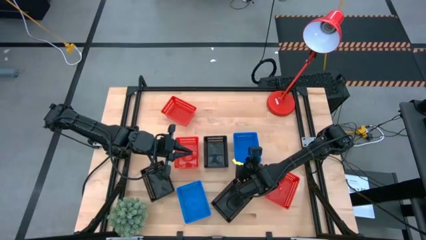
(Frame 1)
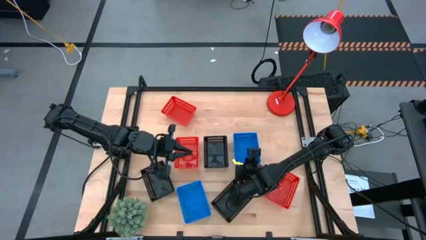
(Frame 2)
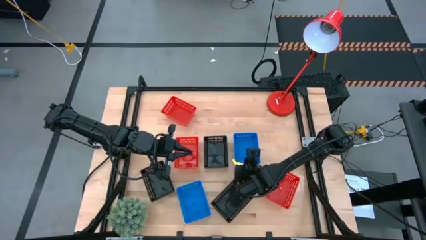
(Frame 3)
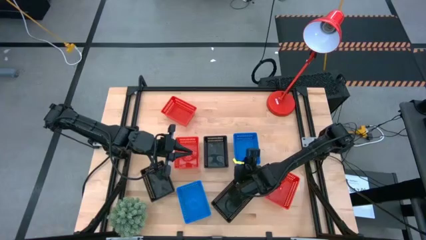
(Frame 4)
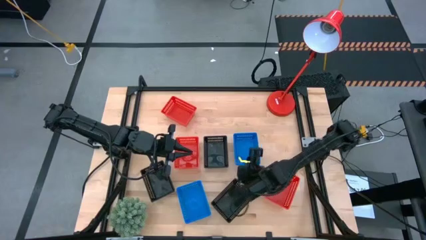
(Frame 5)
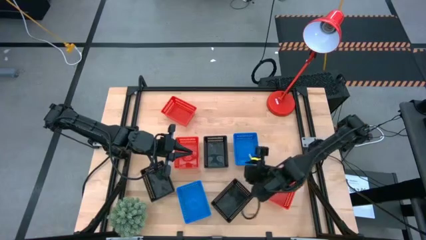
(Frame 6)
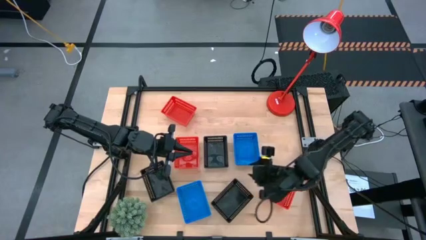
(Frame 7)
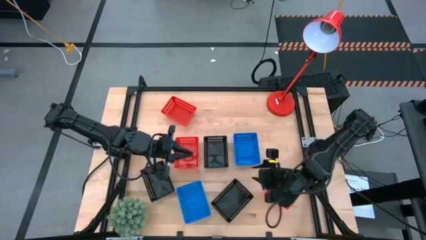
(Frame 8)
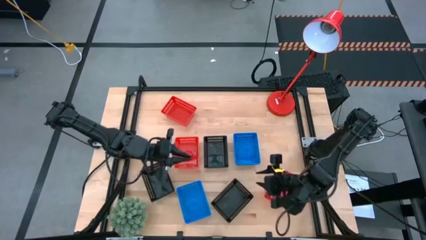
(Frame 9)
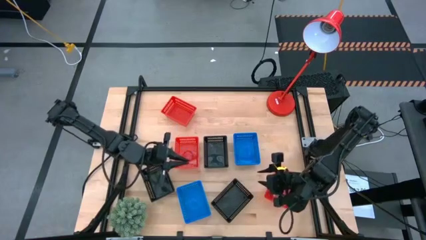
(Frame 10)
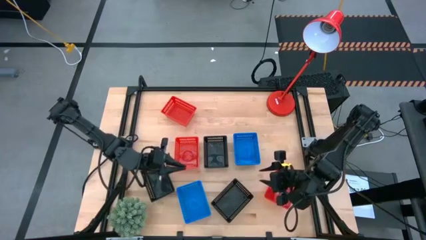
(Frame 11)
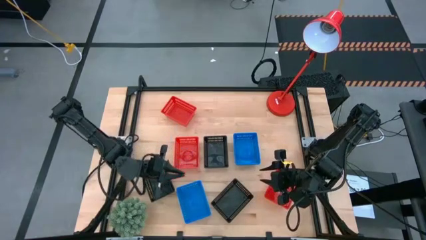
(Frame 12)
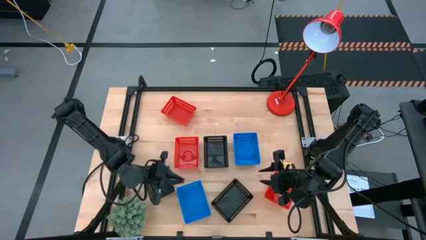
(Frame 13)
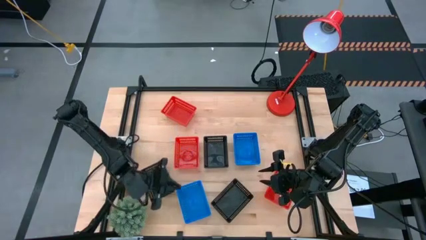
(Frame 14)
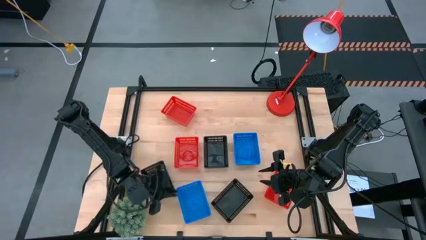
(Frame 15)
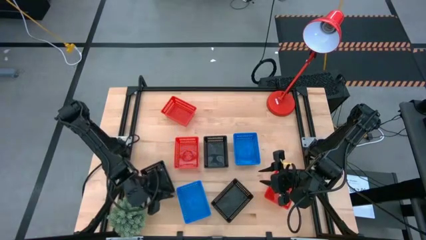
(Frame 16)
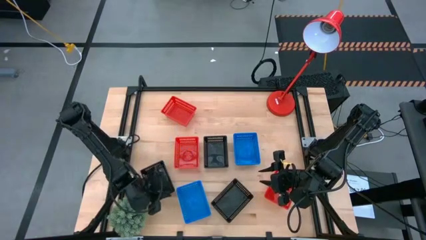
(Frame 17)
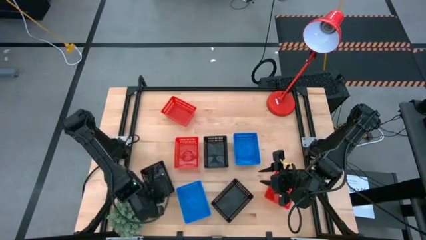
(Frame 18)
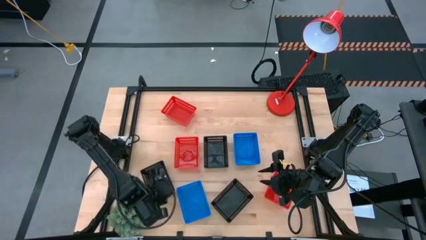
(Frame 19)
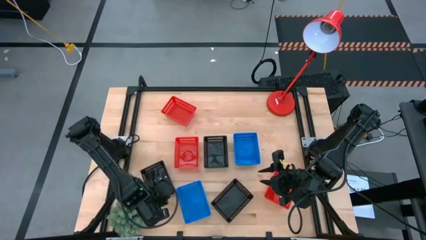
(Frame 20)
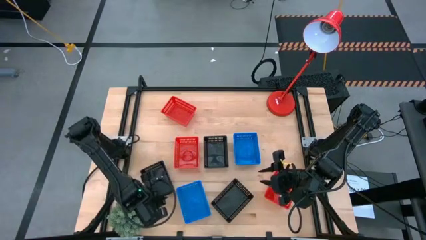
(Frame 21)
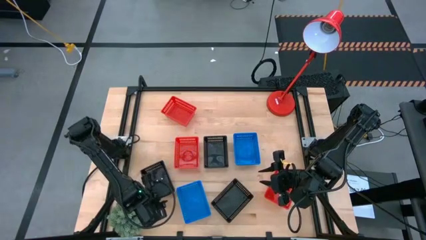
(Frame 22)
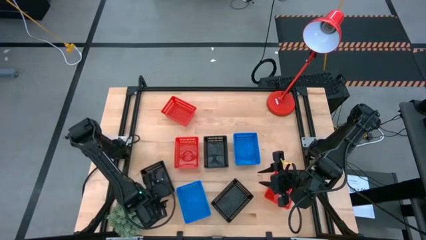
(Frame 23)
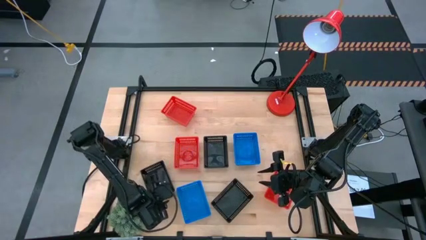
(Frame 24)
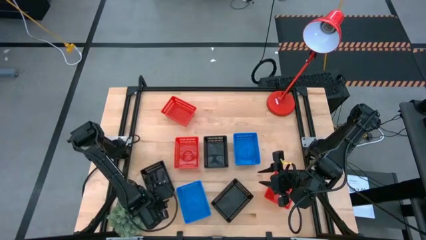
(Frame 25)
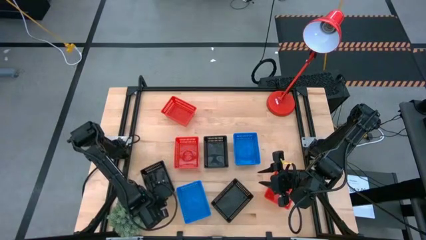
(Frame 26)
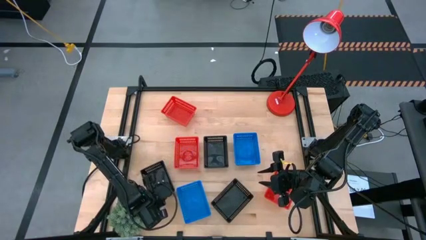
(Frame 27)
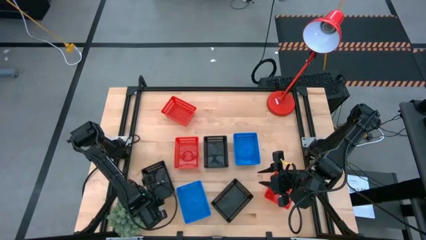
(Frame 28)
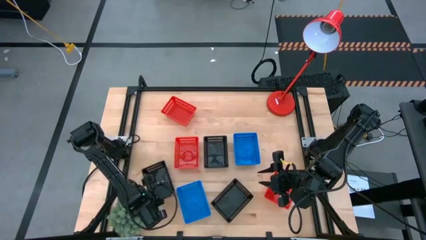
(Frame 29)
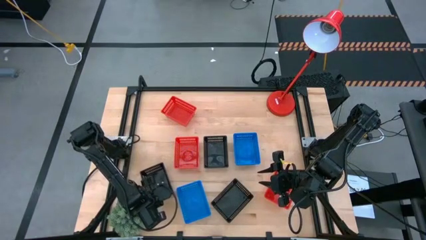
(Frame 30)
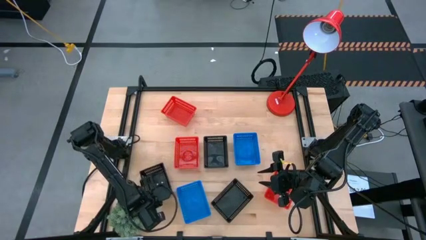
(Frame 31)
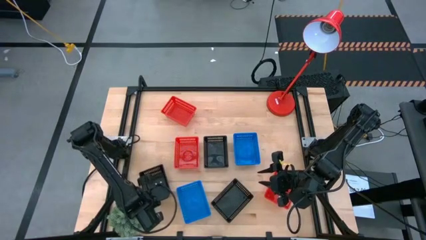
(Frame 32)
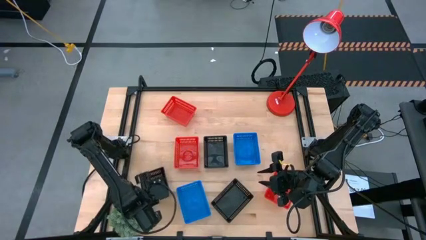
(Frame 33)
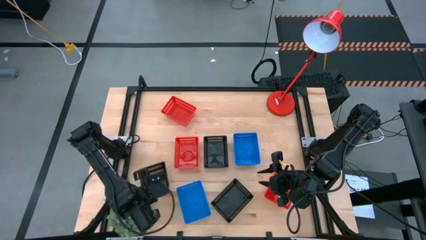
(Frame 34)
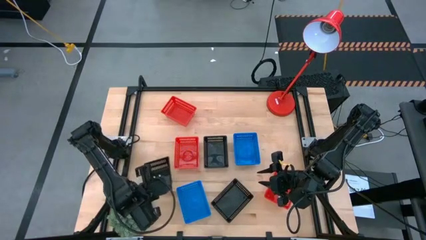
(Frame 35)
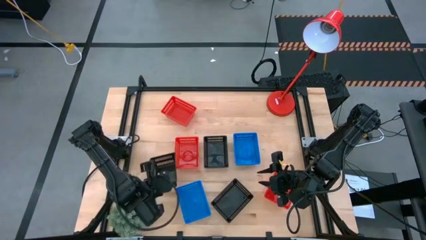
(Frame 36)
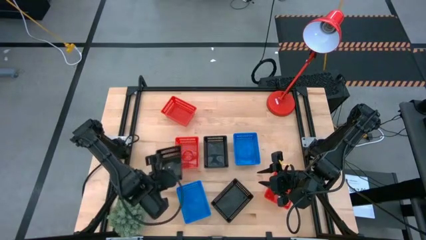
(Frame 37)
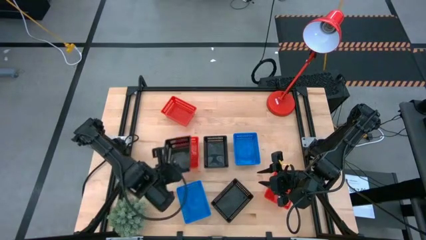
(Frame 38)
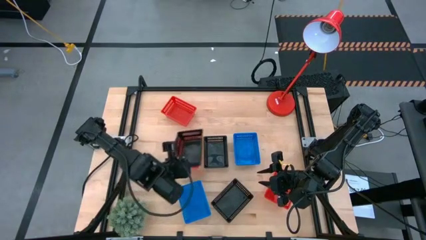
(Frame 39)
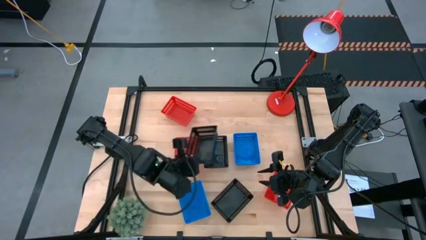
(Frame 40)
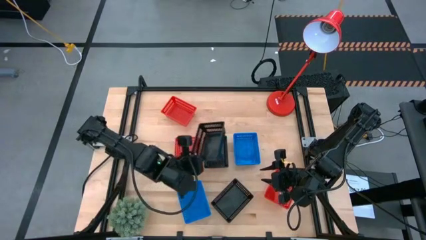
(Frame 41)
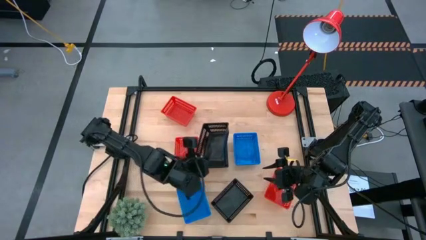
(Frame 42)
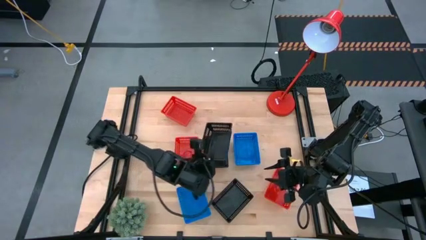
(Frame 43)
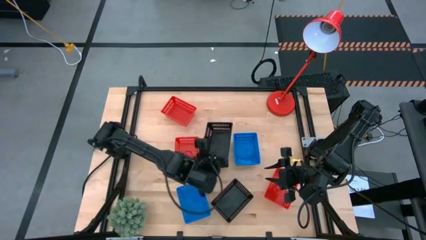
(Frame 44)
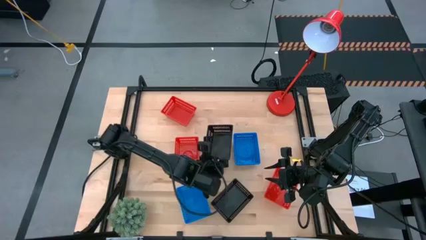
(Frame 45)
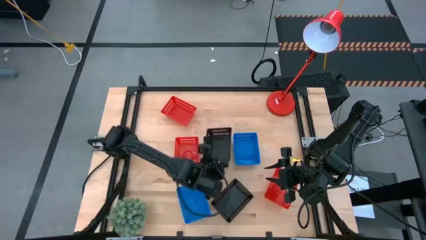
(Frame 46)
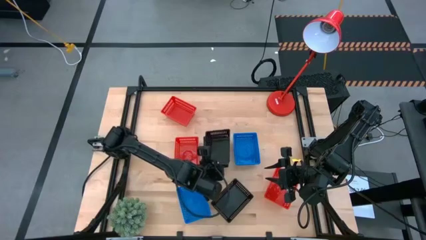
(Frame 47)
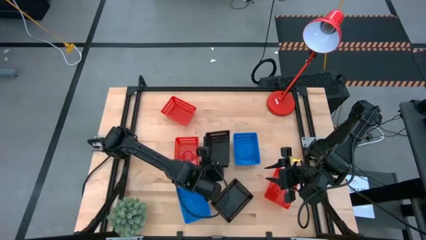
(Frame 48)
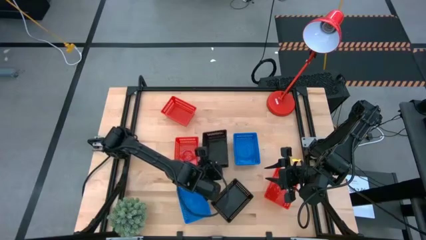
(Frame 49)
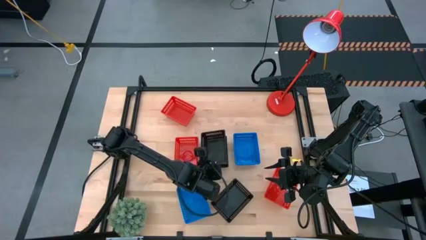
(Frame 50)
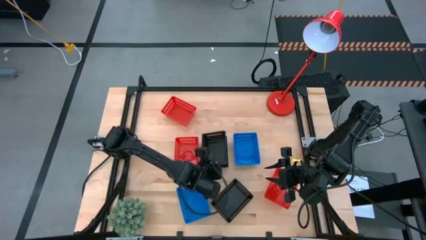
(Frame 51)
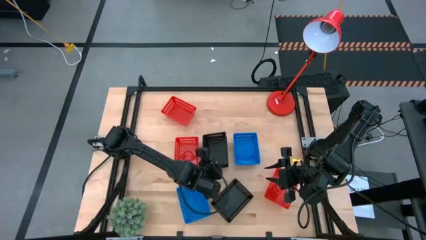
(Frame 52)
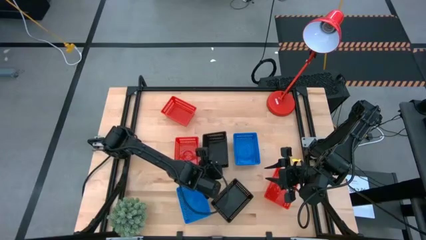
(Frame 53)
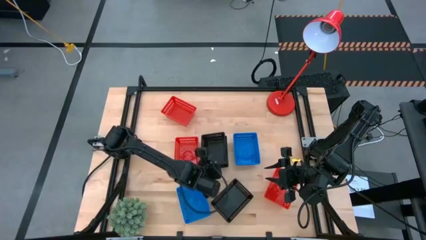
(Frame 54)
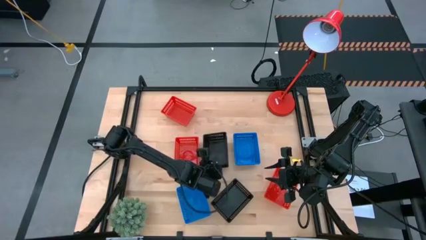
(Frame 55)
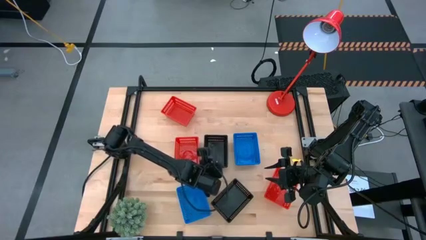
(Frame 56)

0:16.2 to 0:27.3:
Stack the bottom left black bin on the top black bin
